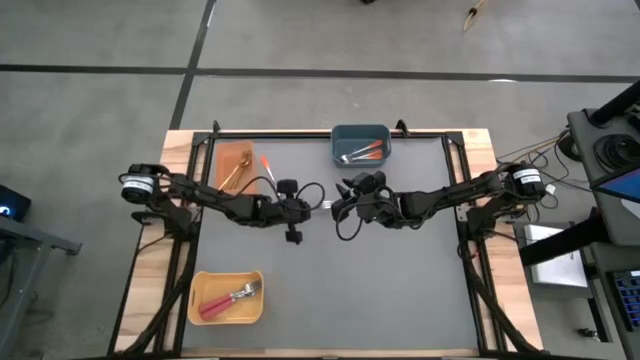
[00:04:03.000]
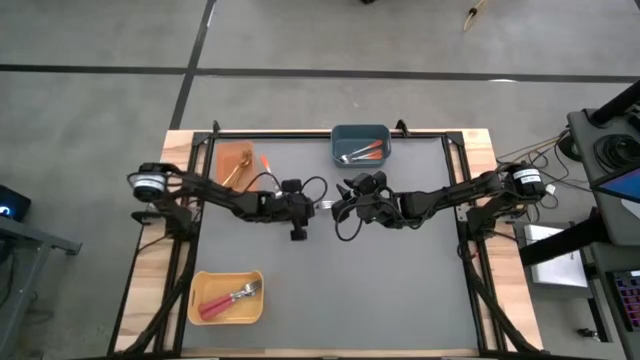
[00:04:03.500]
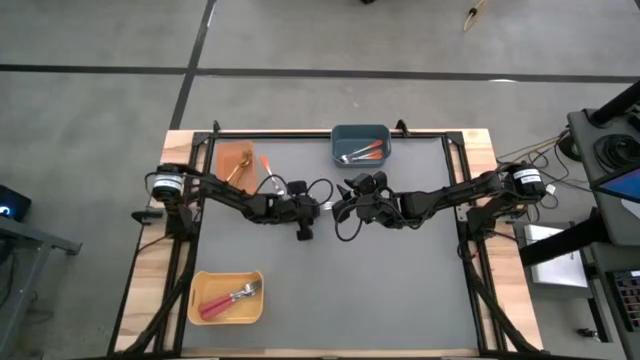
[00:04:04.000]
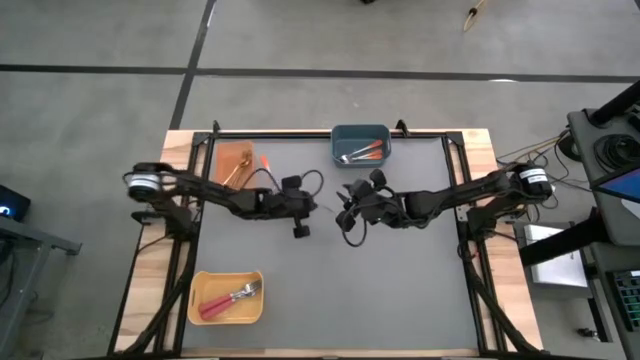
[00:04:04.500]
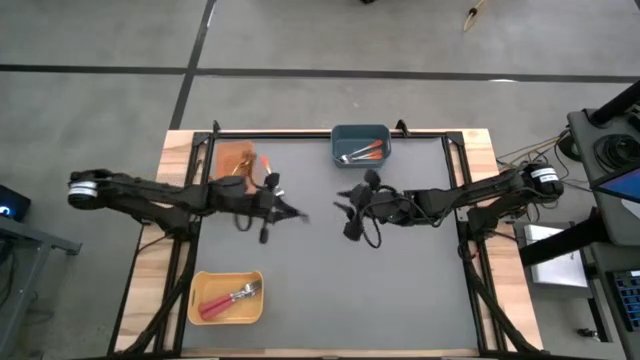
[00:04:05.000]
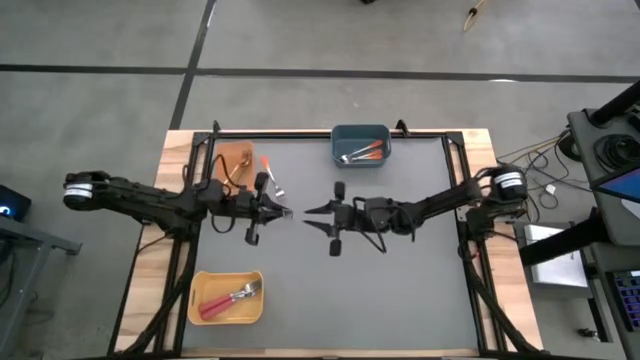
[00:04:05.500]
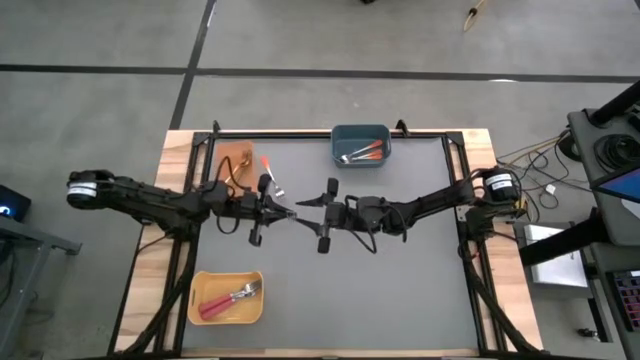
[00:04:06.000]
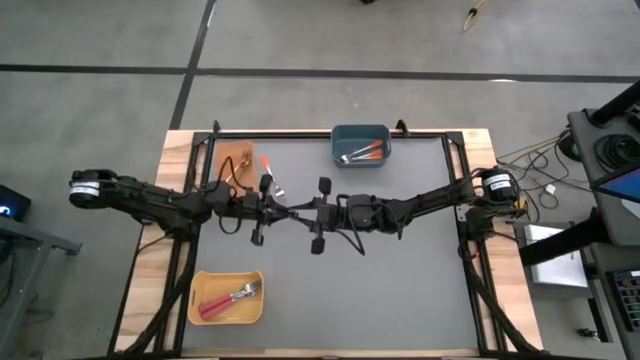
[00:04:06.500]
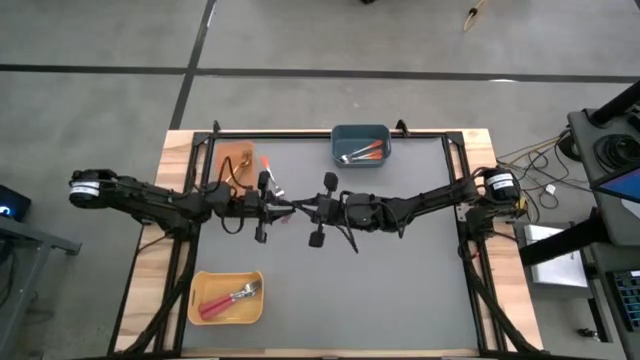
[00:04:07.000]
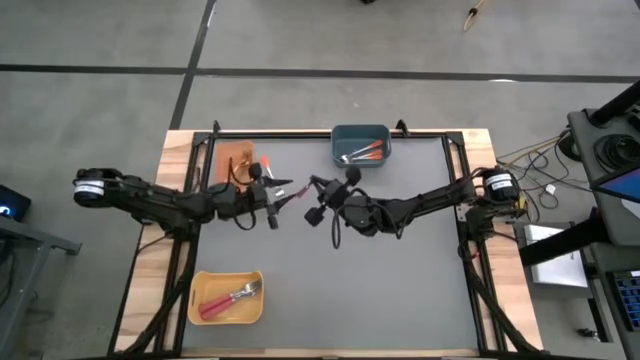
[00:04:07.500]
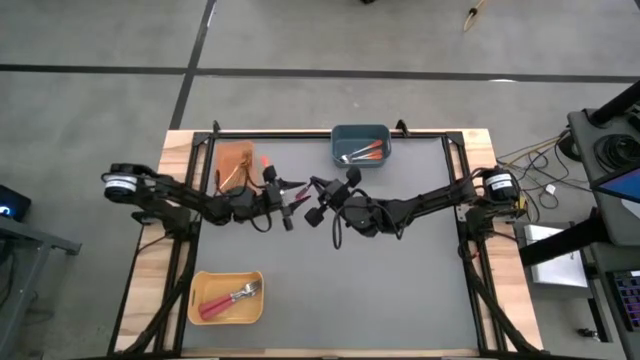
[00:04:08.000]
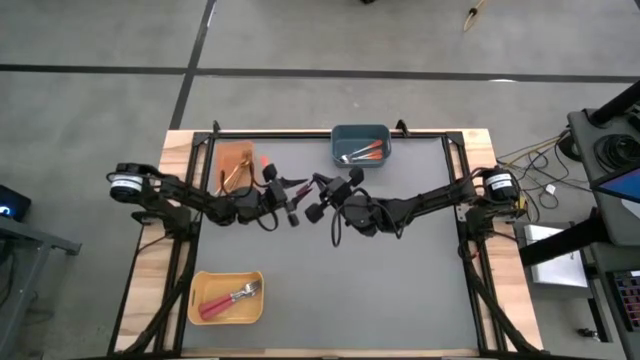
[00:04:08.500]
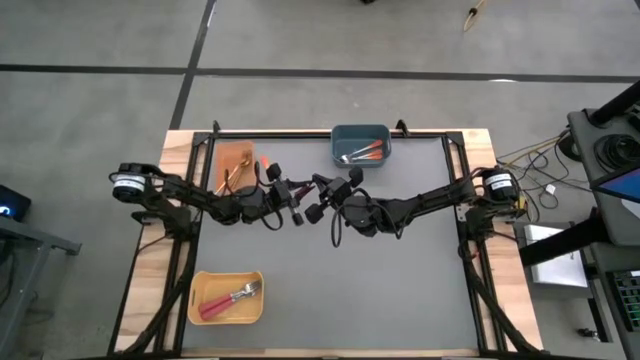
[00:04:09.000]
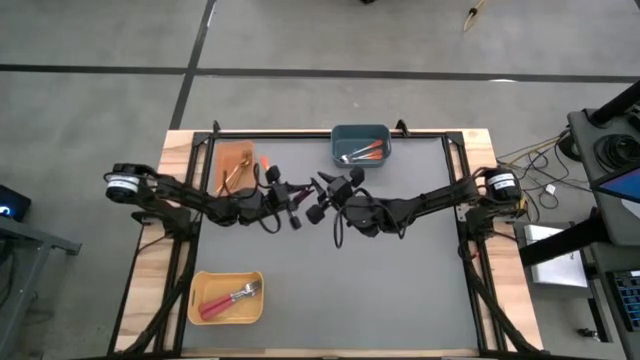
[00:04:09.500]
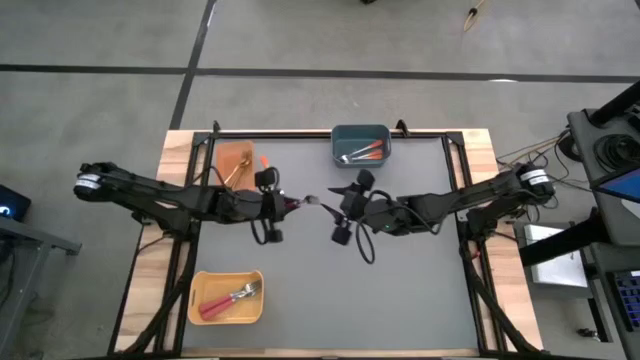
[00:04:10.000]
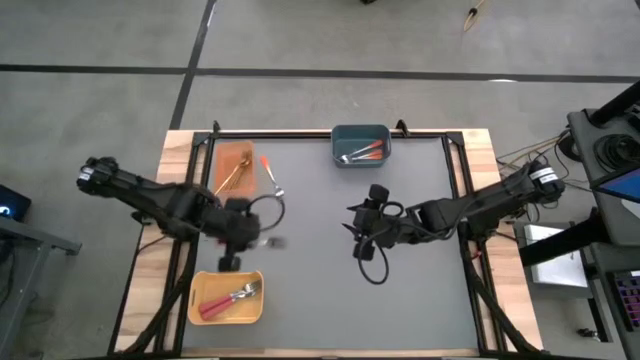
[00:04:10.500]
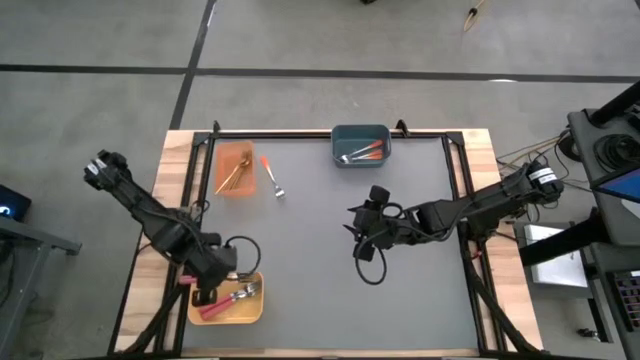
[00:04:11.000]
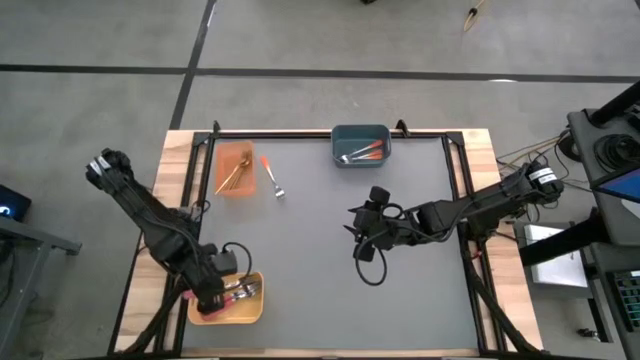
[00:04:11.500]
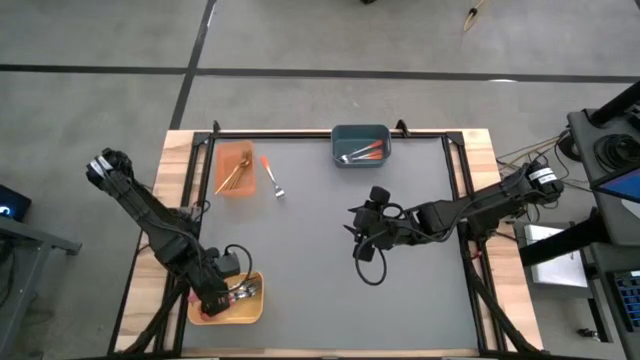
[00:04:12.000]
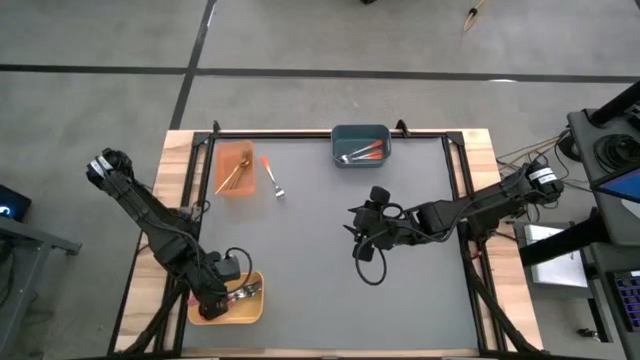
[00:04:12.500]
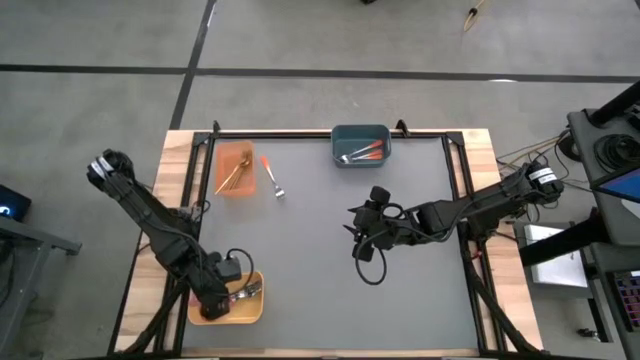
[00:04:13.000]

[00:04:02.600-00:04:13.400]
Task: Sort silverware by color (type)
Put the pink fork into the yellow bin

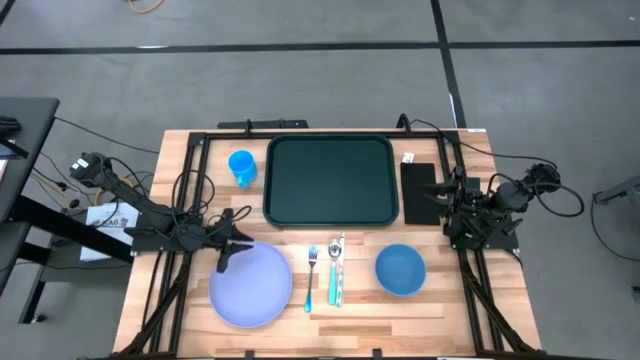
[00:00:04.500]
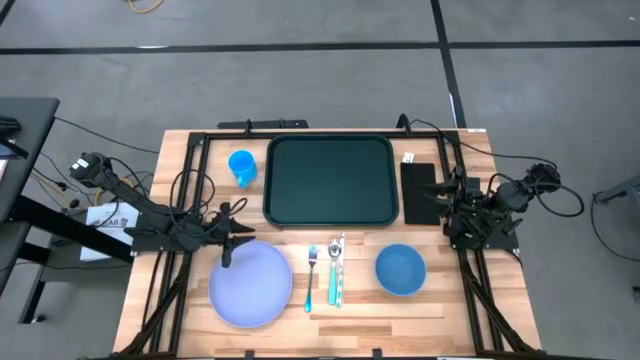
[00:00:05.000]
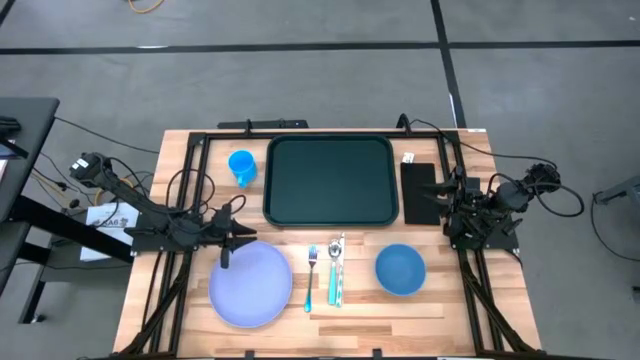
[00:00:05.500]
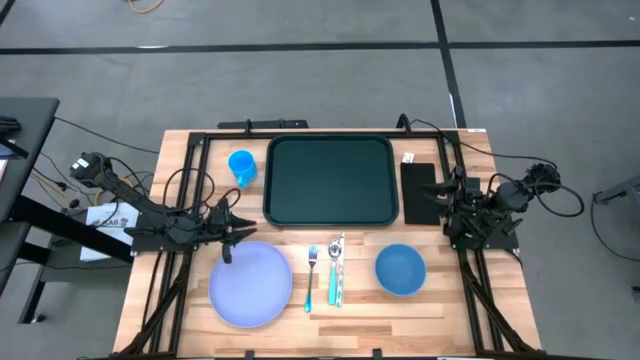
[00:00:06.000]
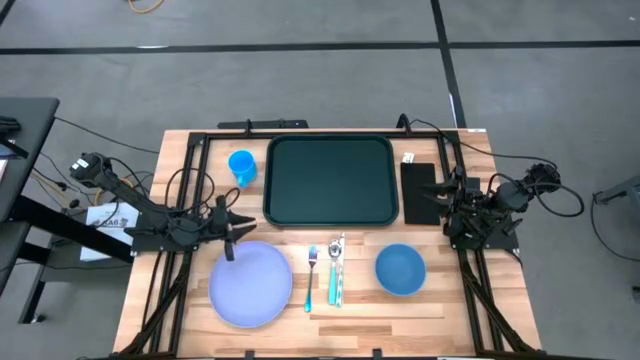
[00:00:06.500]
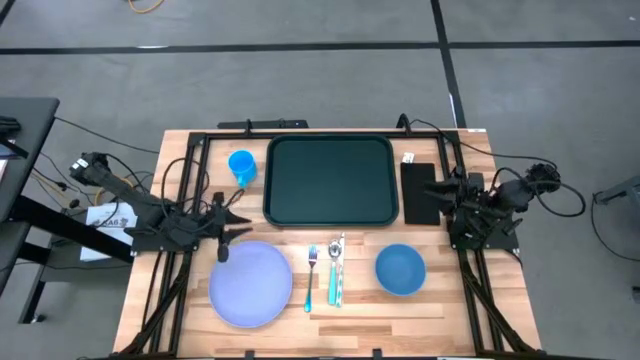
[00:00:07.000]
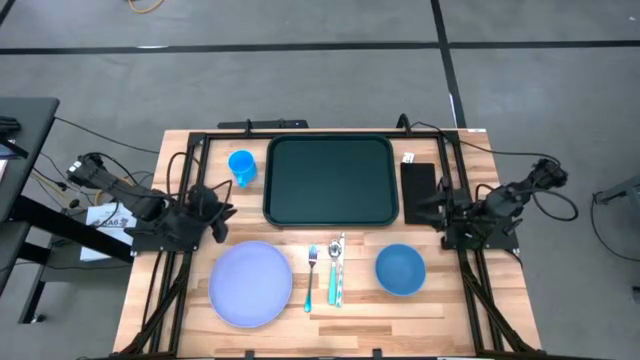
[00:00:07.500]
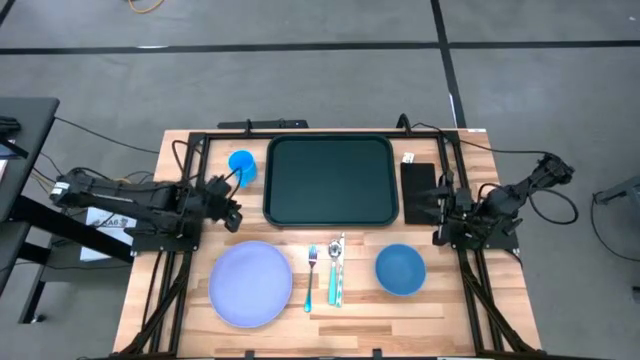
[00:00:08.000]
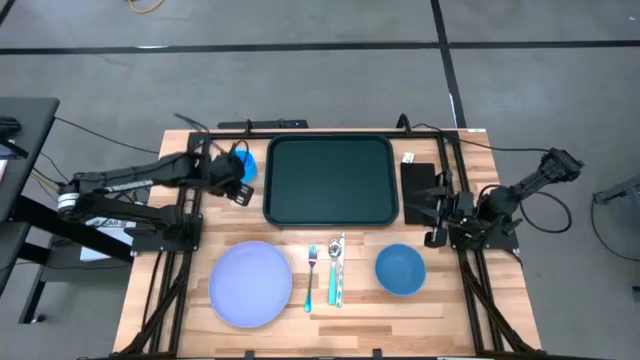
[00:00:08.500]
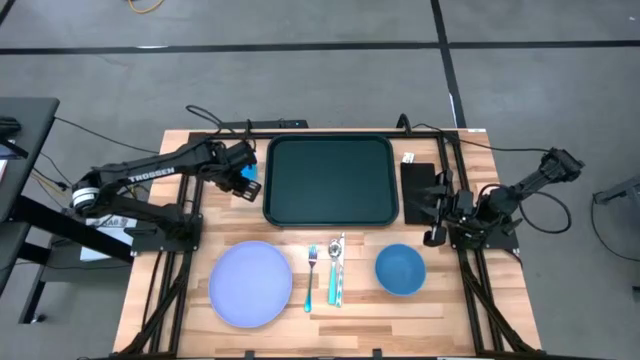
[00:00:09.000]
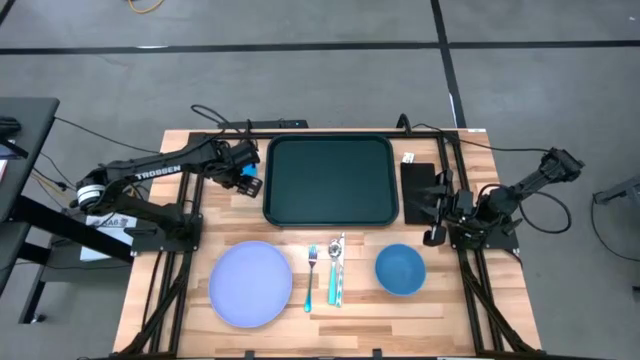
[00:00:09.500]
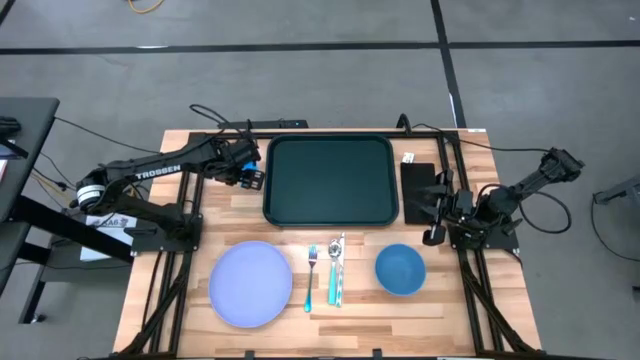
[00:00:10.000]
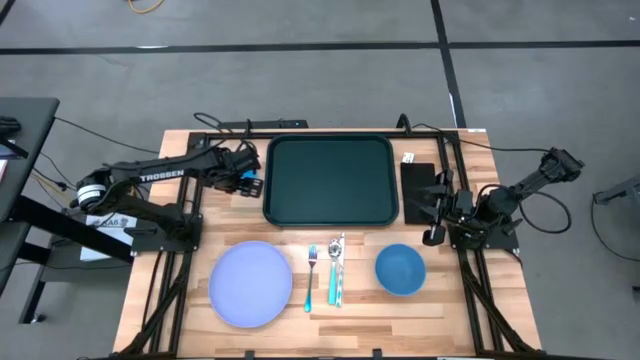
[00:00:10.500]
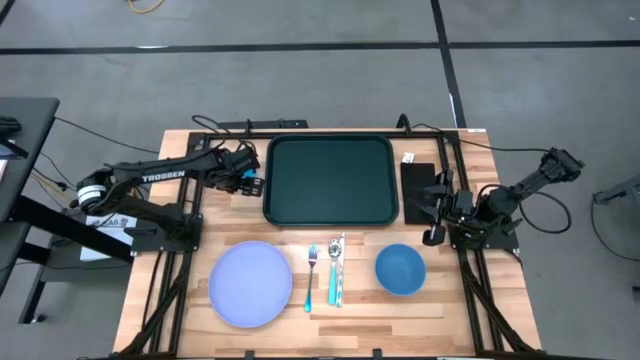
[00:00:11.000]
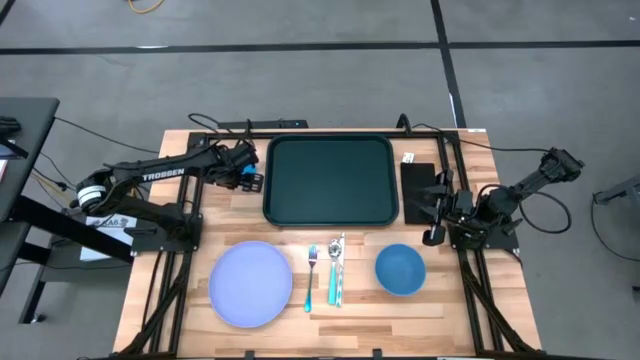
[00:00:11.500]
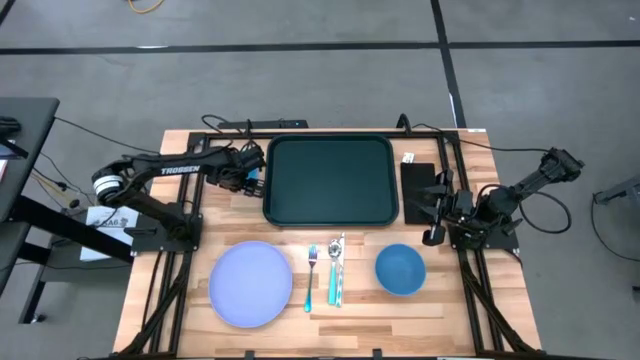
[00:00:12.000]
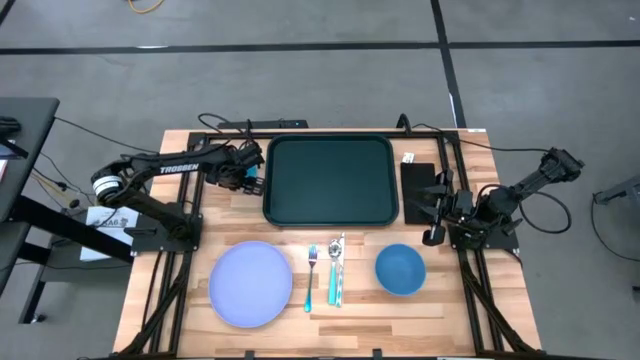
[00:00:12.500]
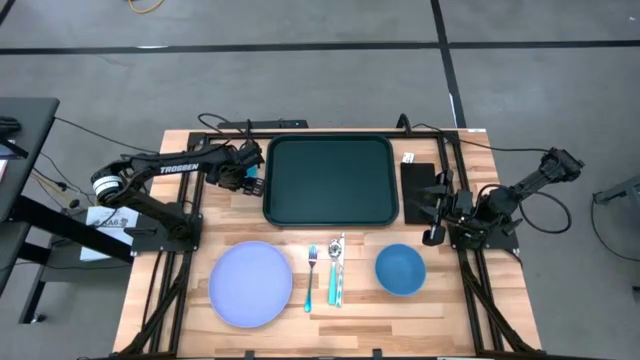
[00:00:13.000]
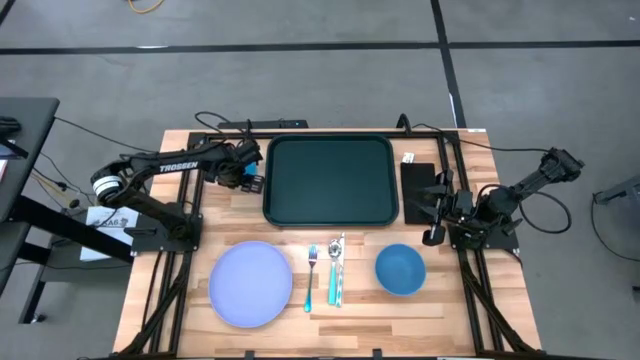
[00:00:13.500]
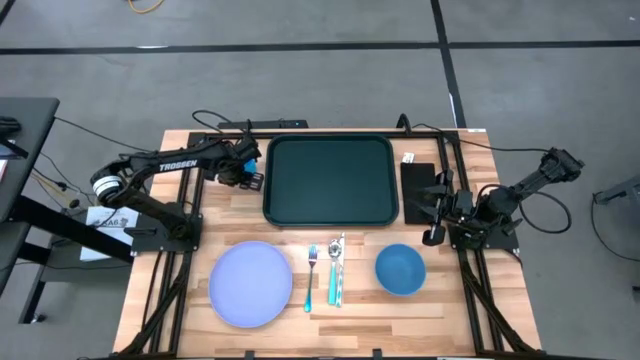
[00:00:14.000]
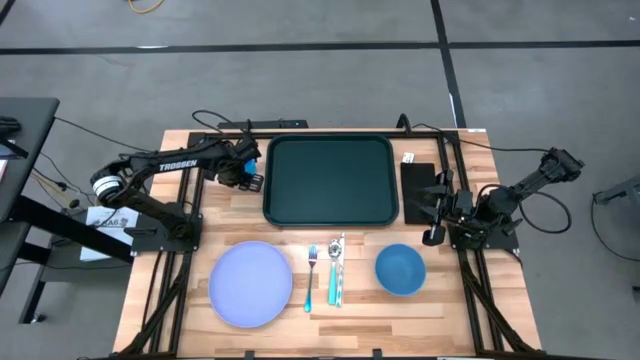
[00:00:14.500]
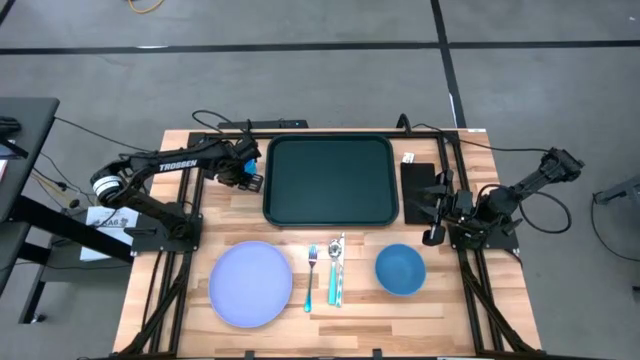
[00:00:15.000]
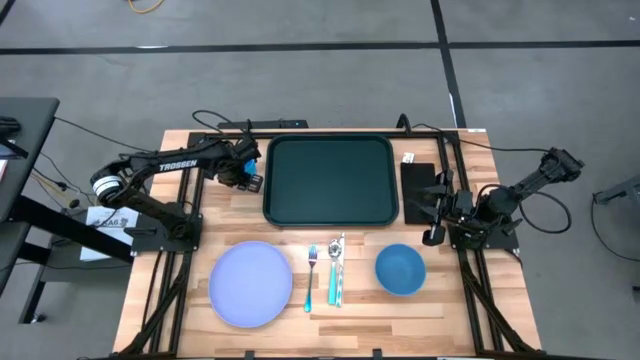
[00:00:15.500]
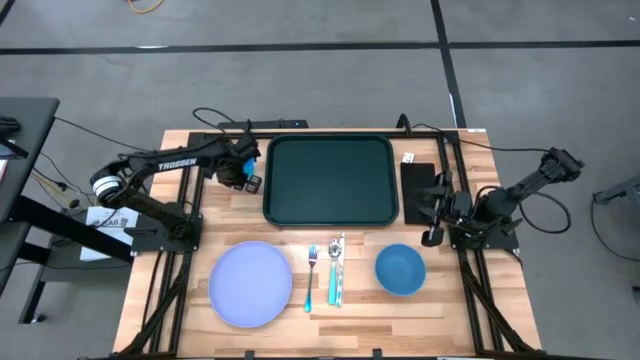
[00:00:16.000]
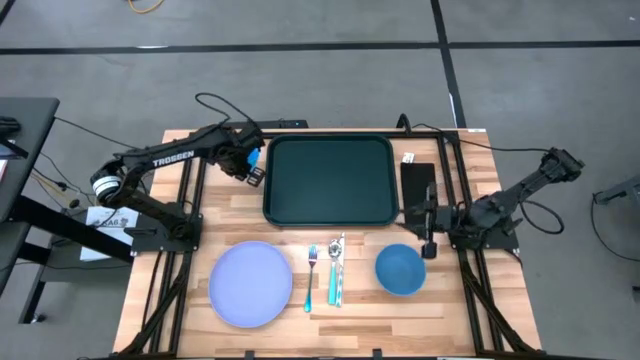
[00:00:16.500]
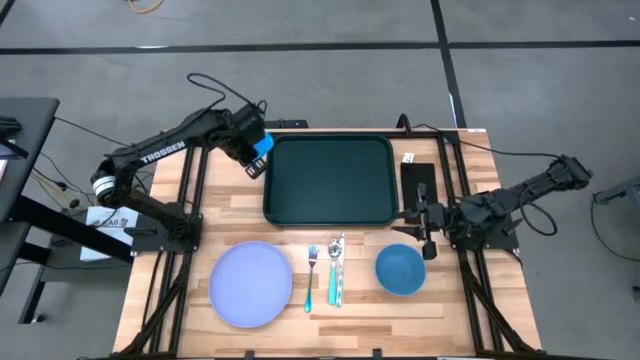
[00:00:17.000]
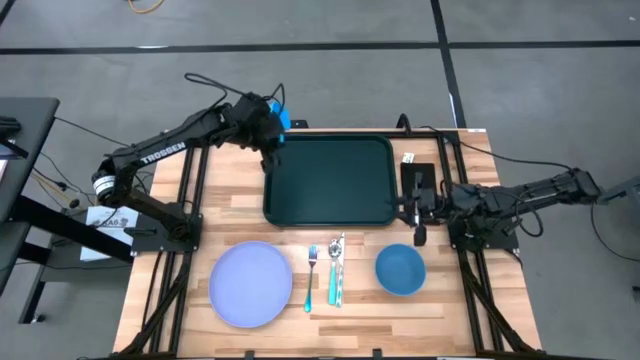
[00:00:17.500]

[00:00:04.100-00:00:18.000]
Task: Set up tray
Put the blue mug on the black serving tray
